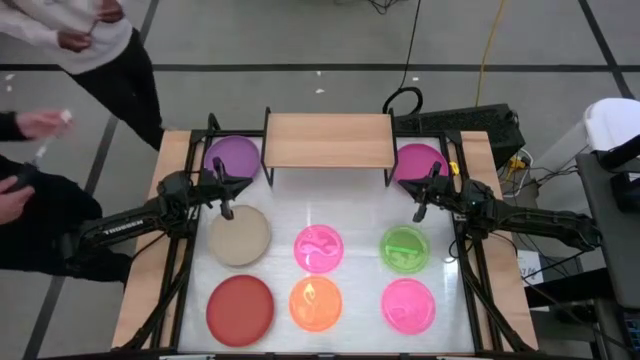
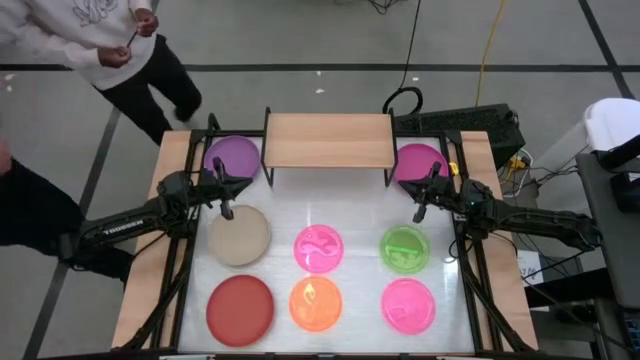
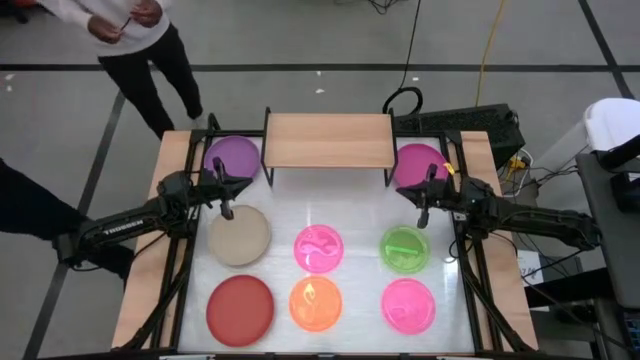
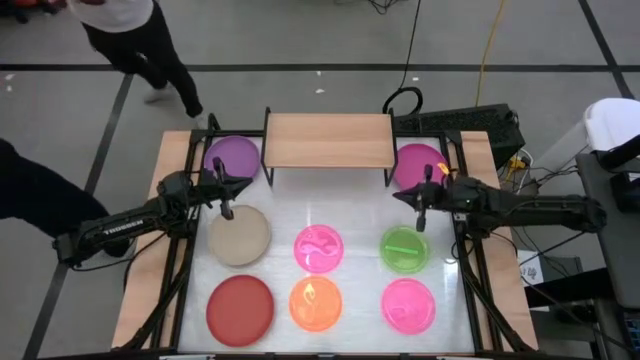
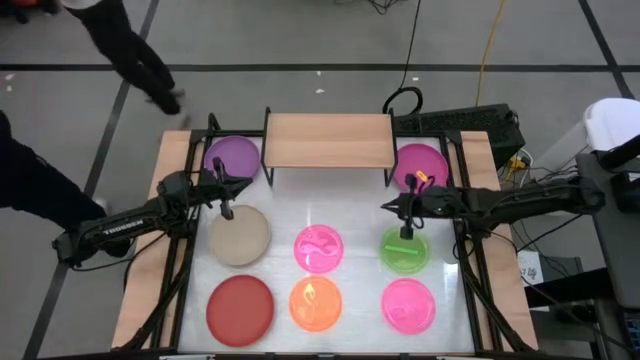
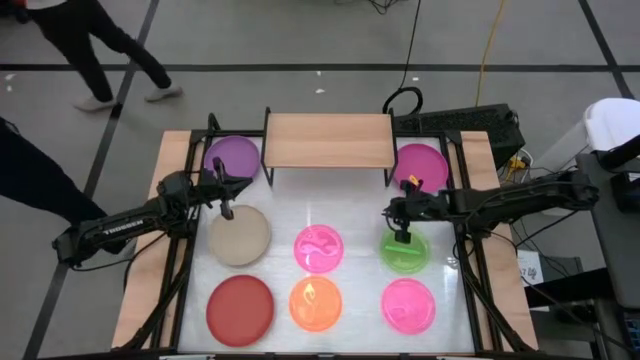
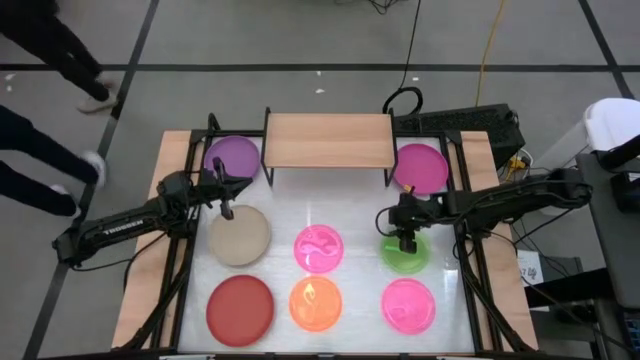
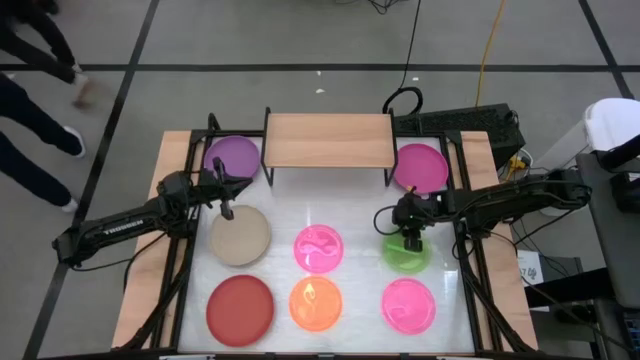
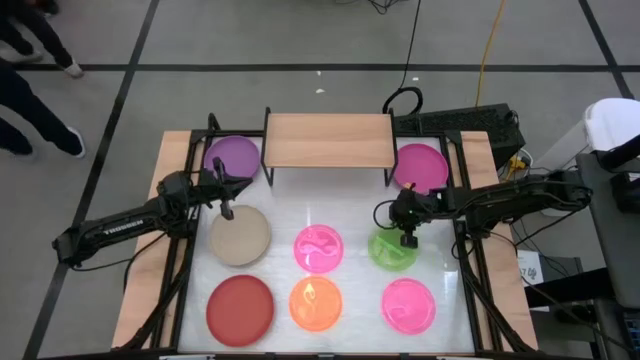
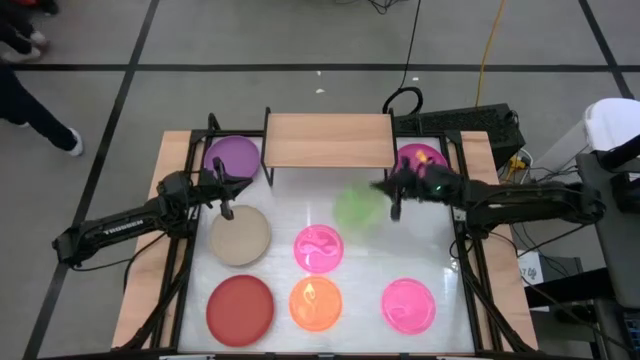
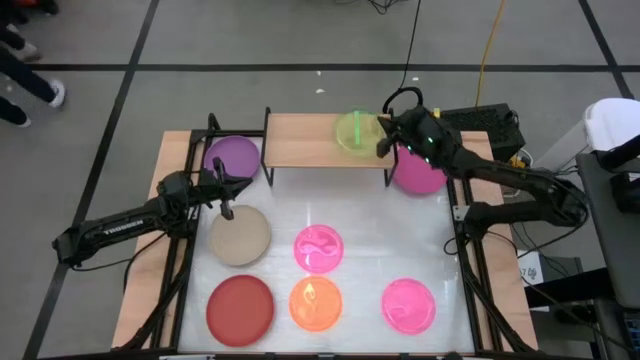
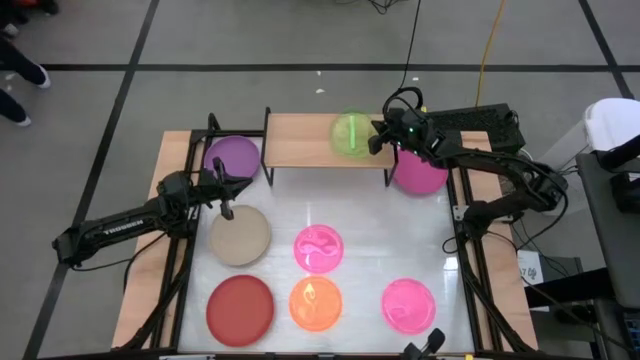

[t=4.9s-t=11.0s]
Task: Place and stack plates onto a shelf
Put the small green plate on the shelf

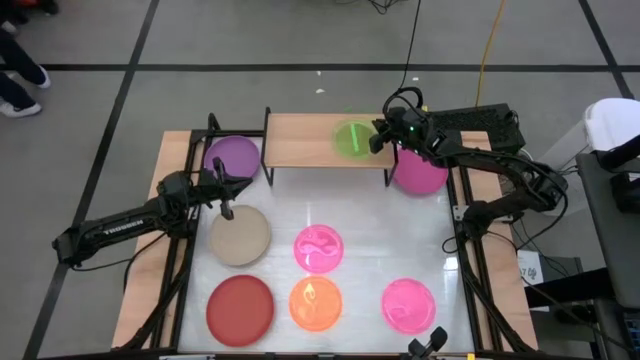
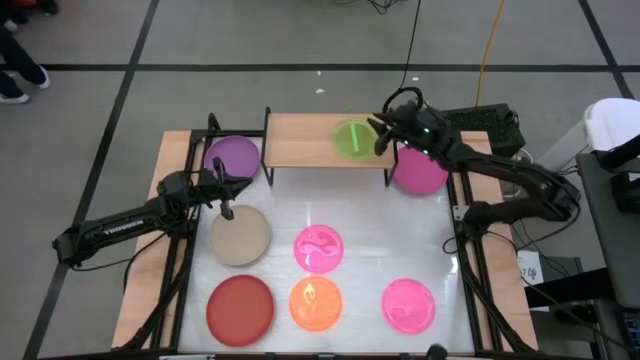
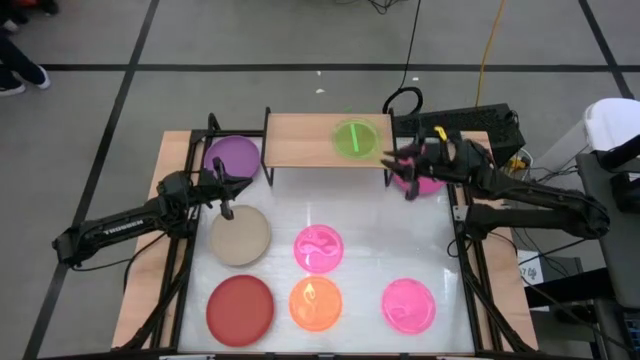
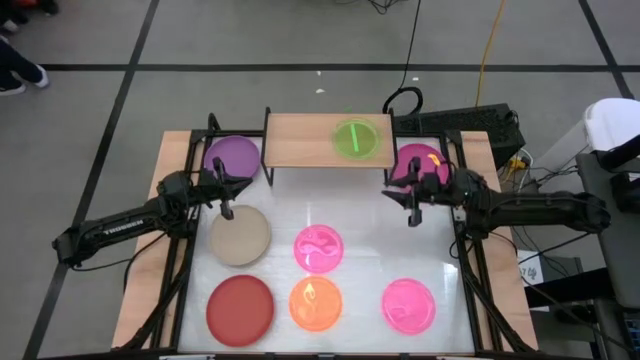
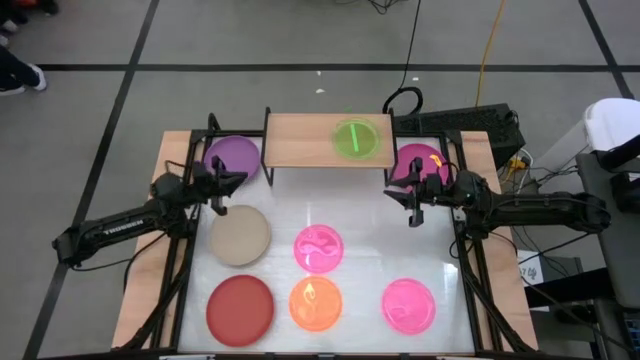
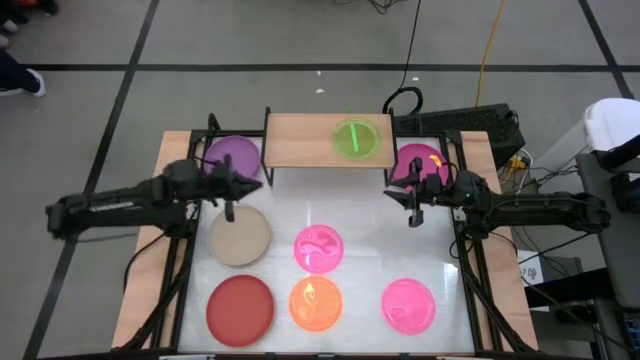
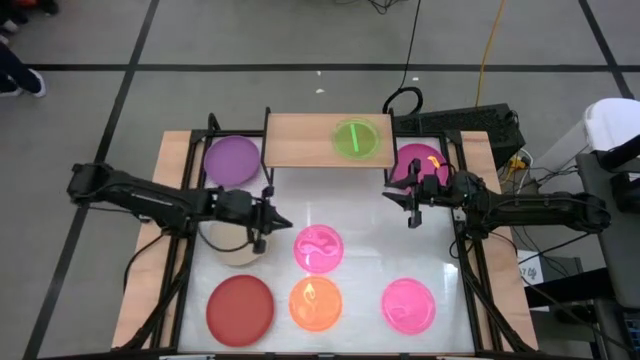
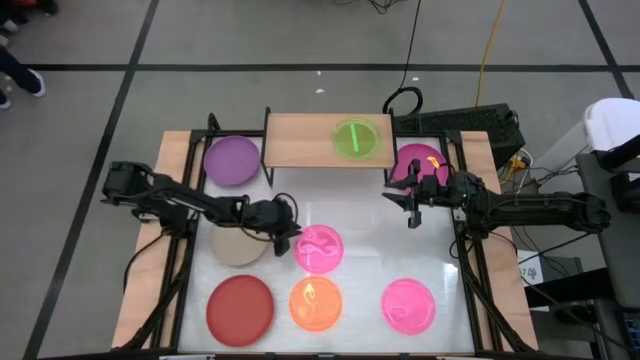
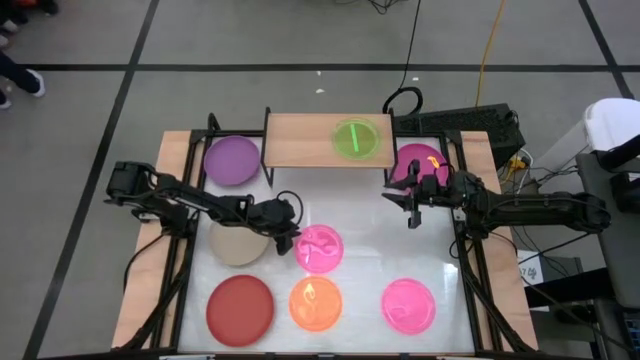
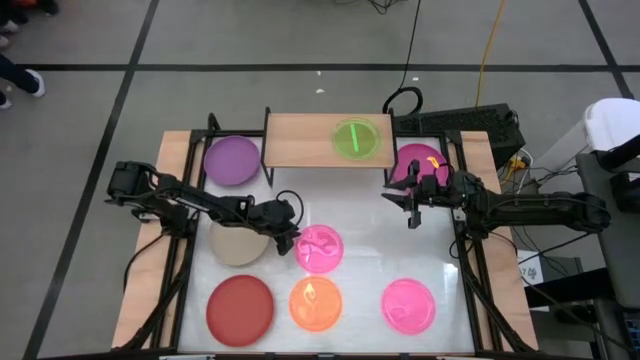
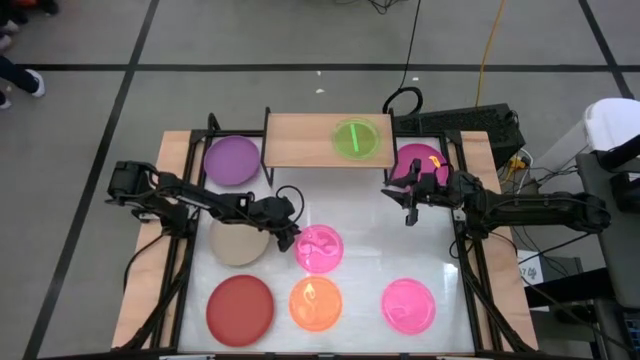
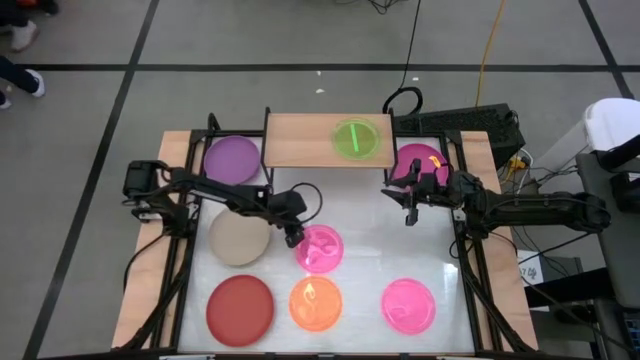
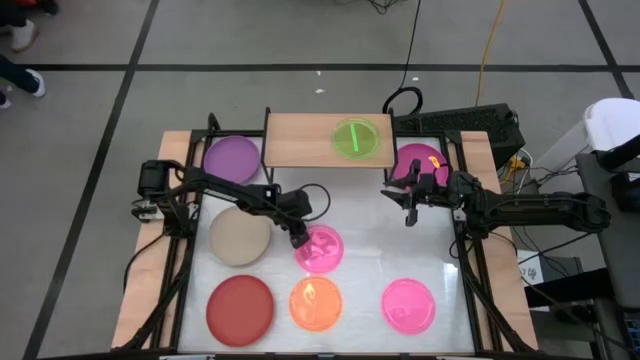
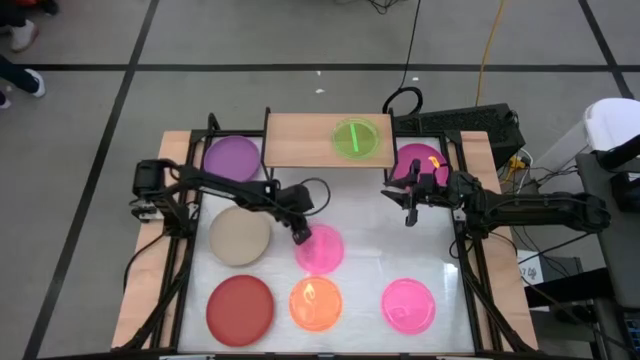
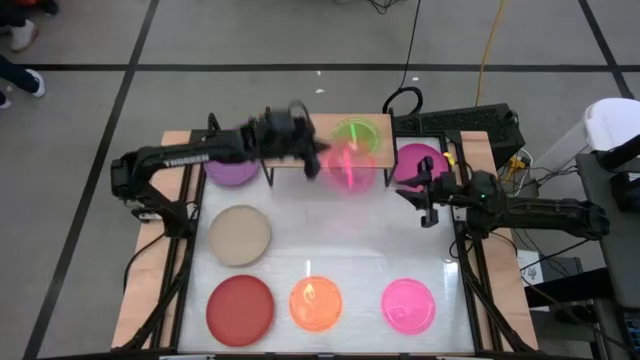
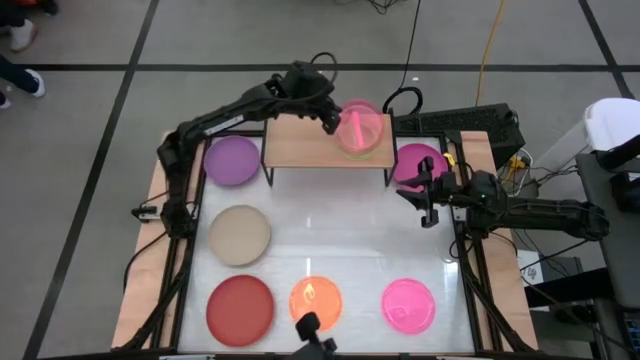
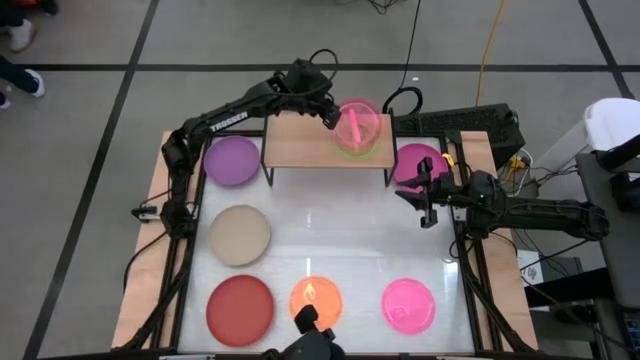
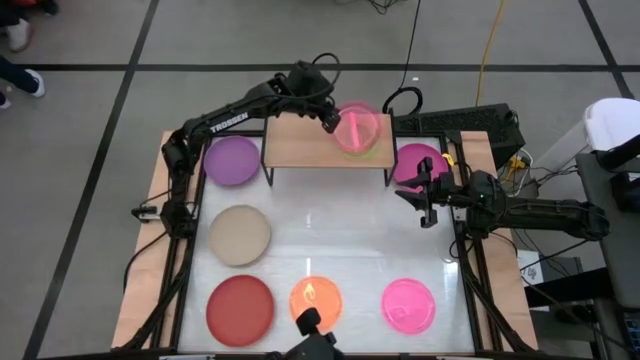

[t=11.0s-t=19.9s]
Stack the small pink plate on the left on top of the other small green plate on the shelf

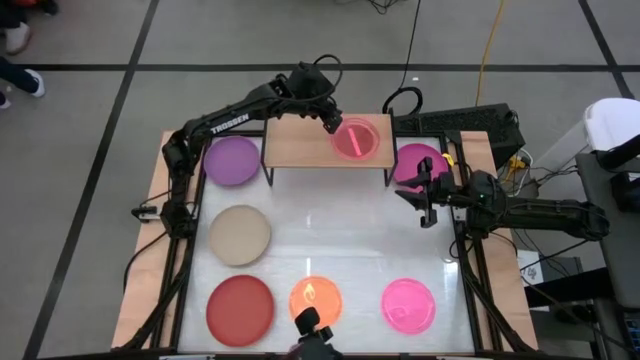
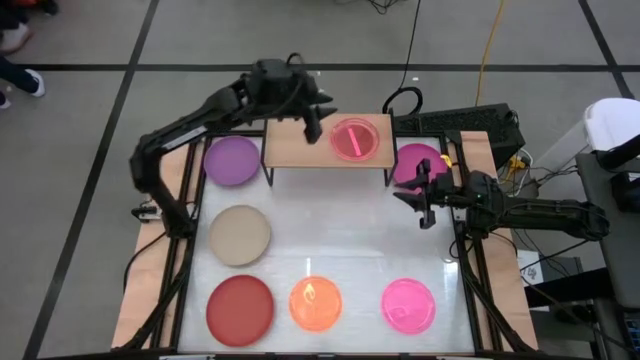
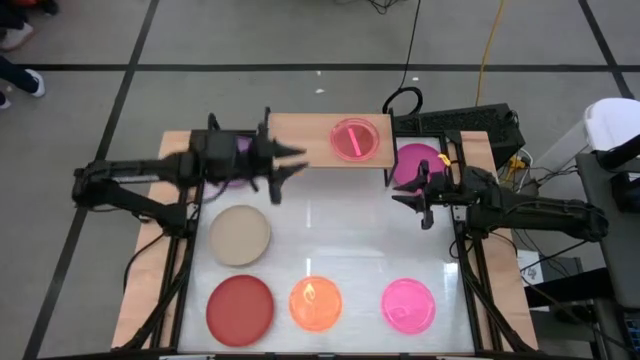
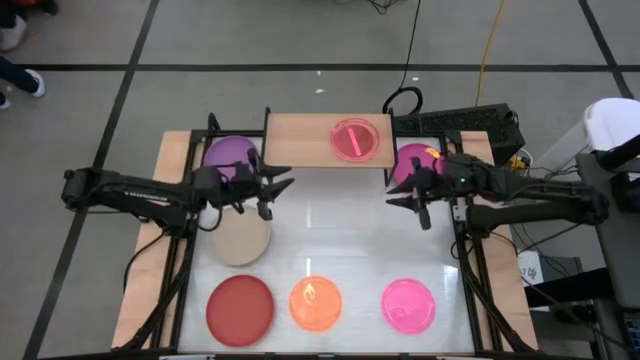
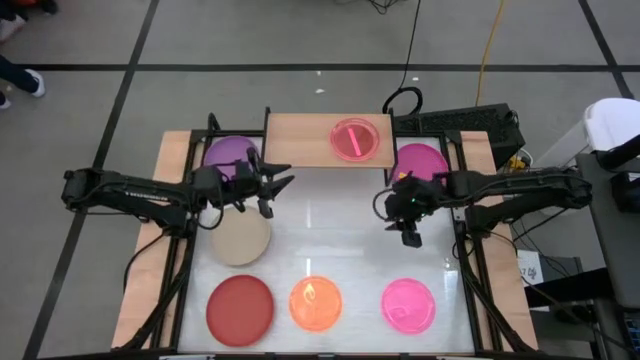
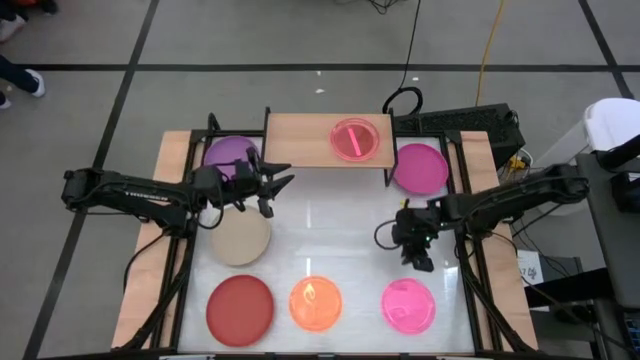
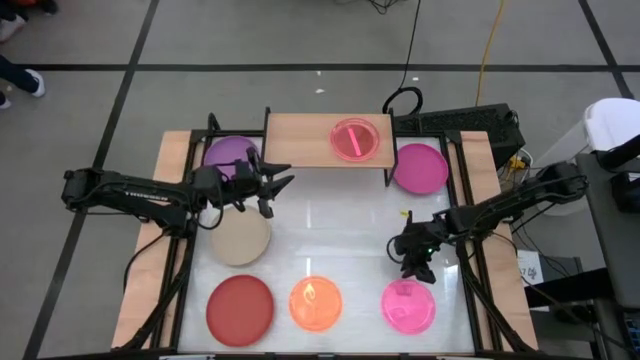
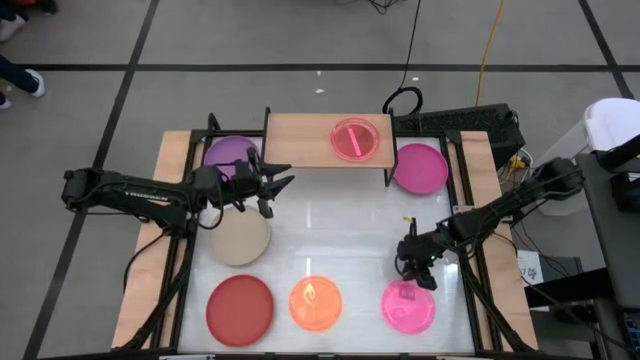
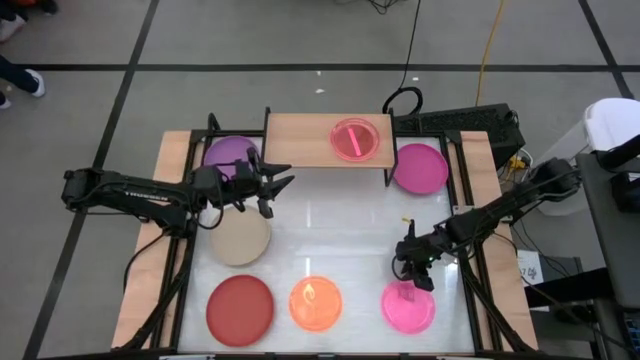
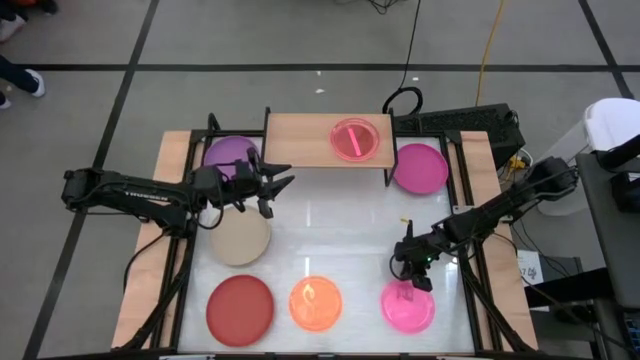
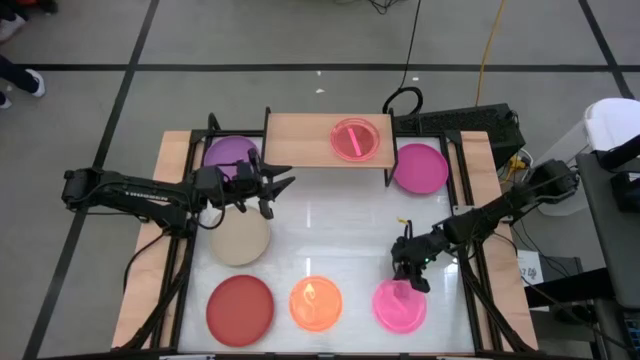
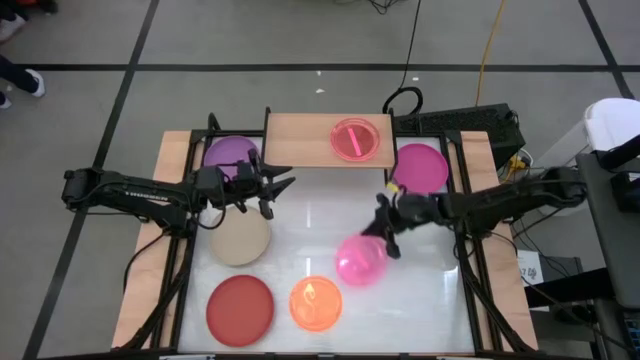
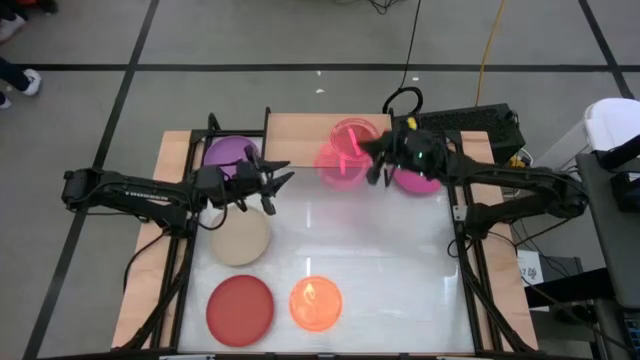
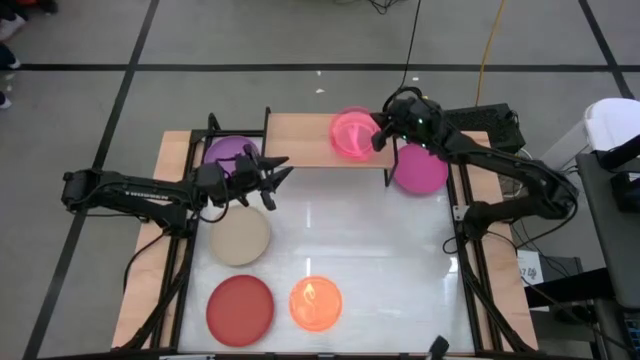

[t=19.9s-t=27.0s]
Stack the small pink plate on top of the other small pink plate on the shelf
